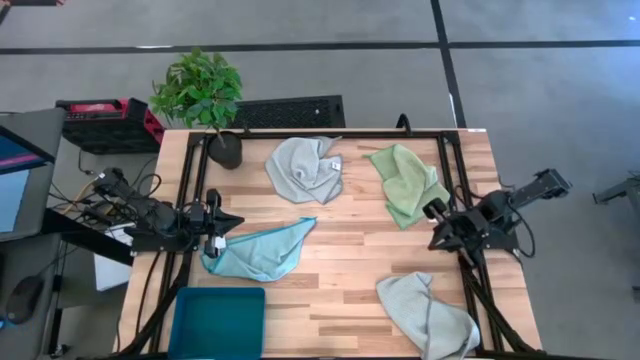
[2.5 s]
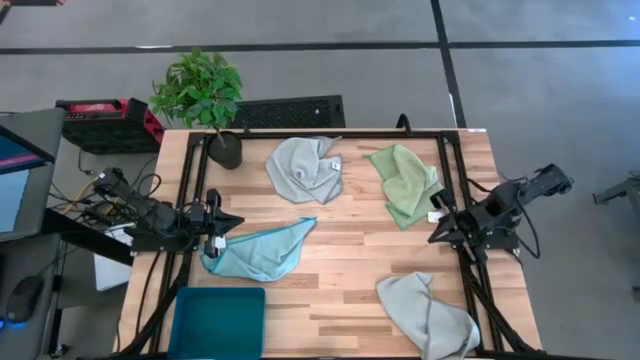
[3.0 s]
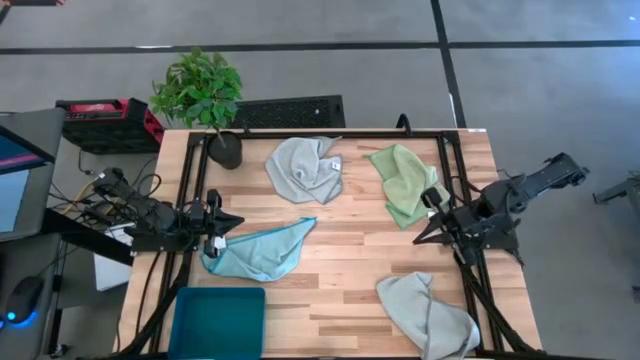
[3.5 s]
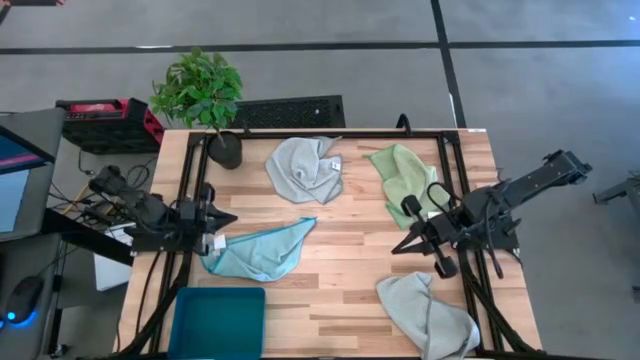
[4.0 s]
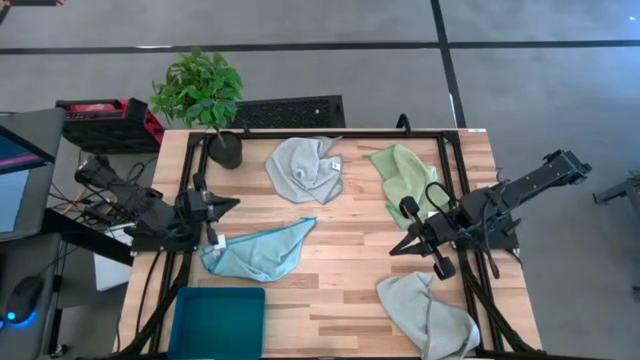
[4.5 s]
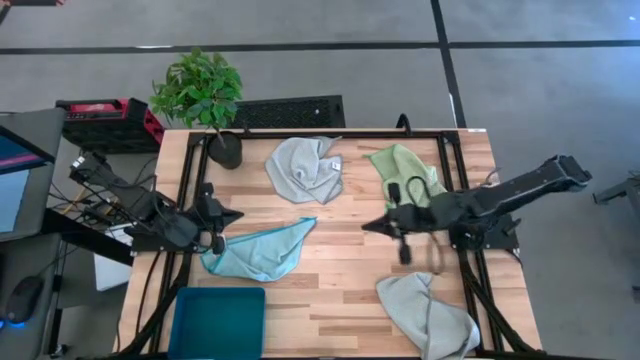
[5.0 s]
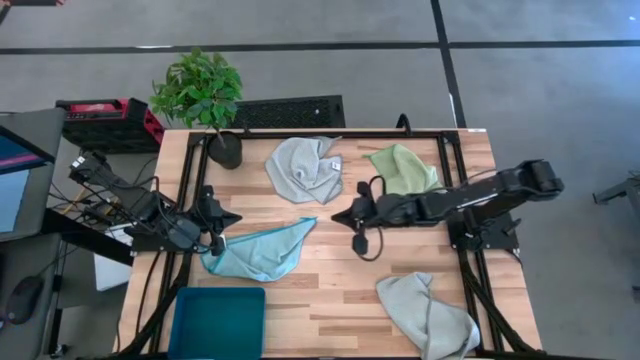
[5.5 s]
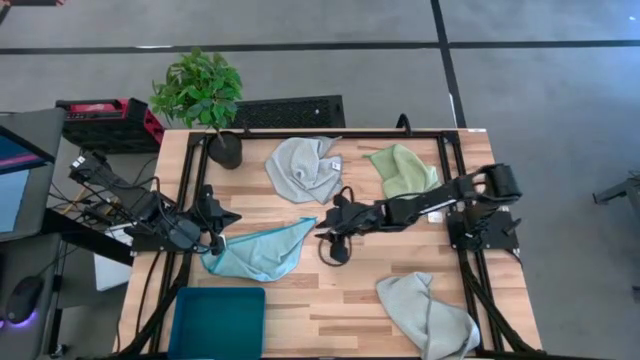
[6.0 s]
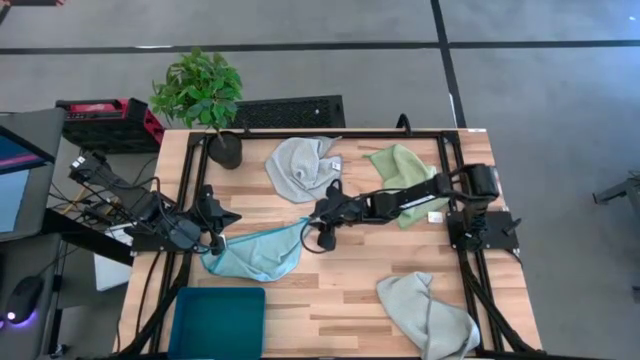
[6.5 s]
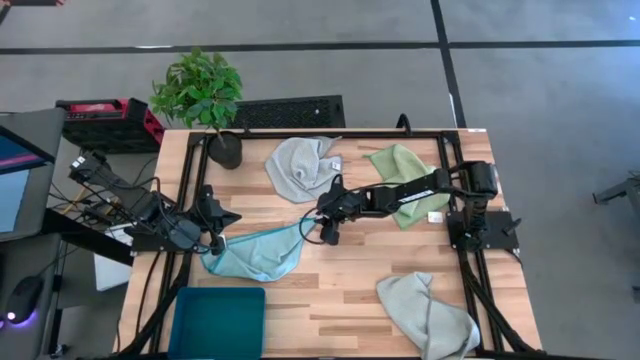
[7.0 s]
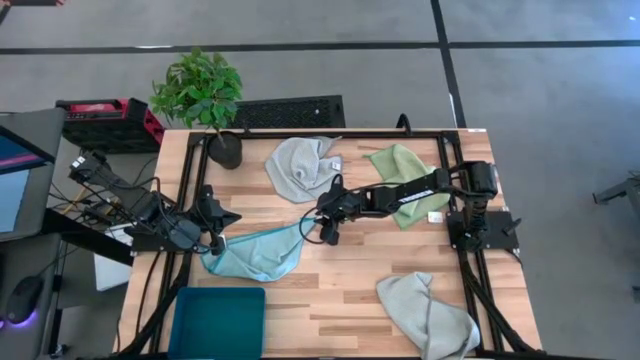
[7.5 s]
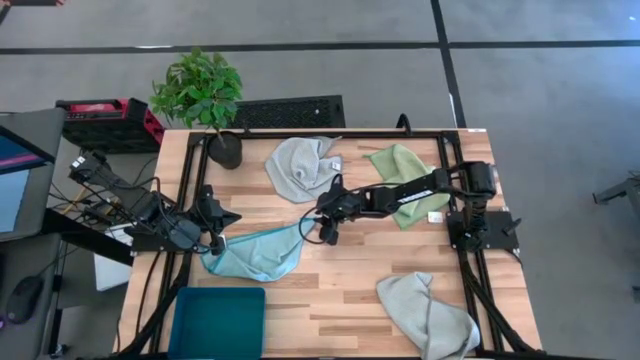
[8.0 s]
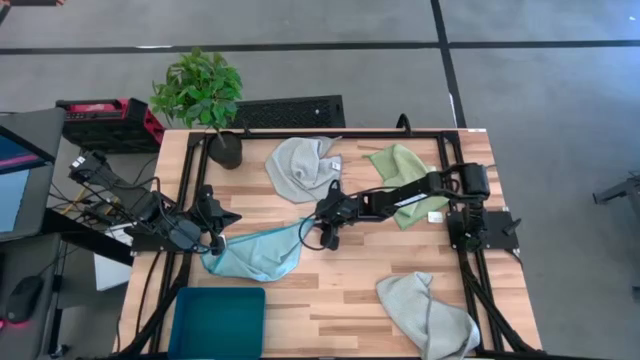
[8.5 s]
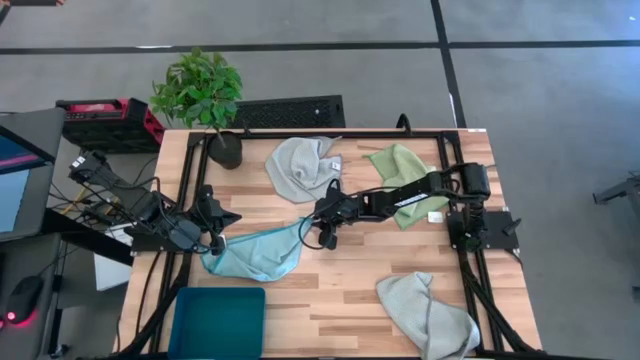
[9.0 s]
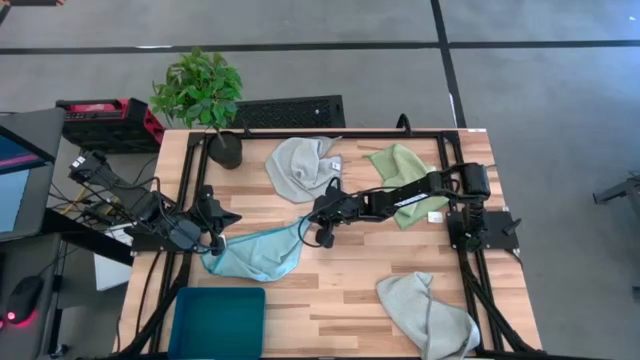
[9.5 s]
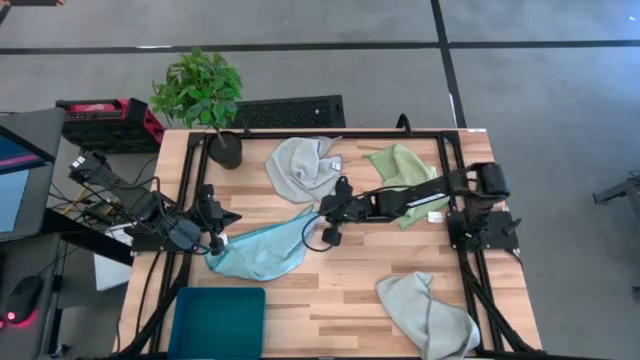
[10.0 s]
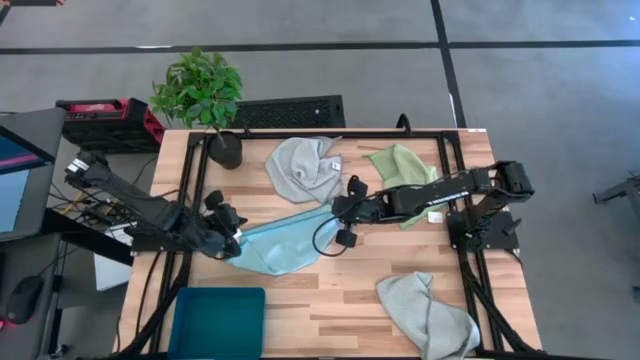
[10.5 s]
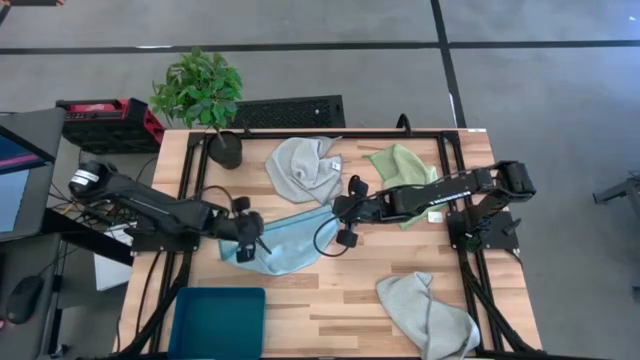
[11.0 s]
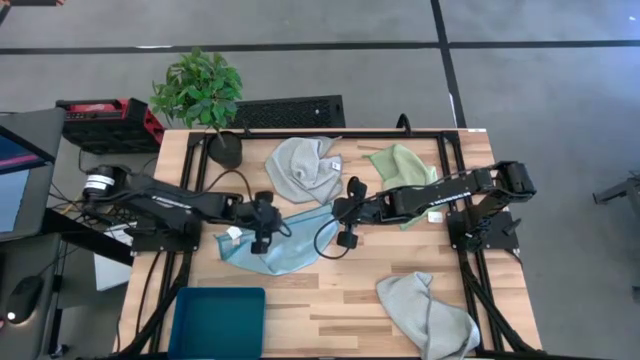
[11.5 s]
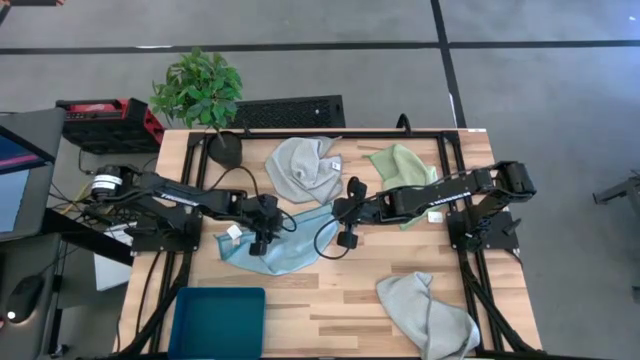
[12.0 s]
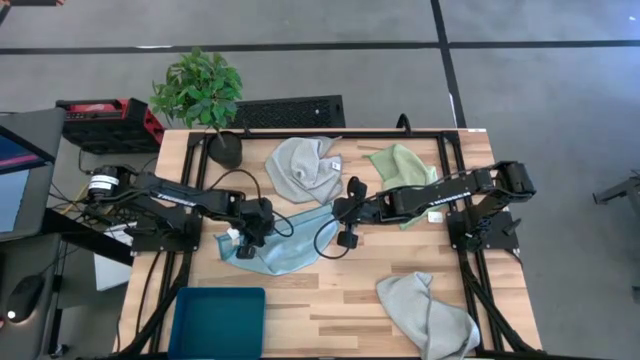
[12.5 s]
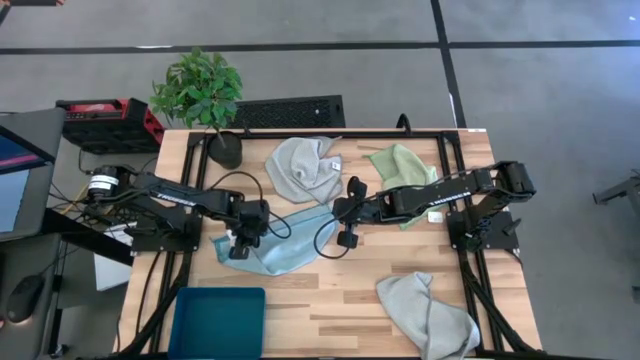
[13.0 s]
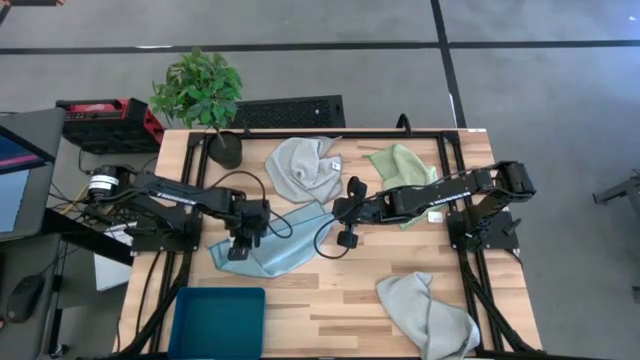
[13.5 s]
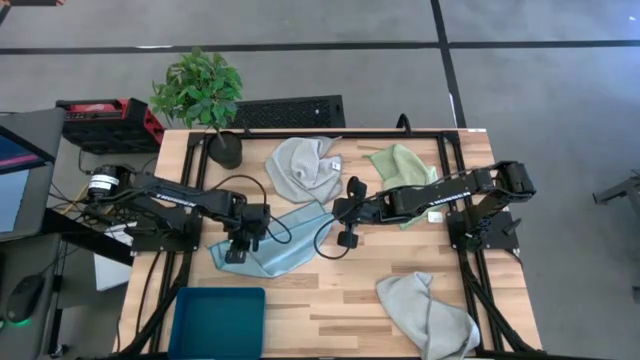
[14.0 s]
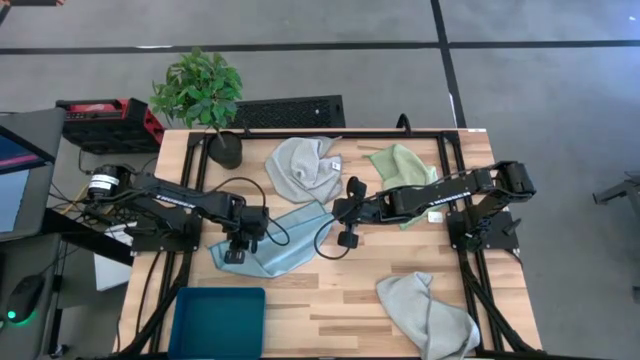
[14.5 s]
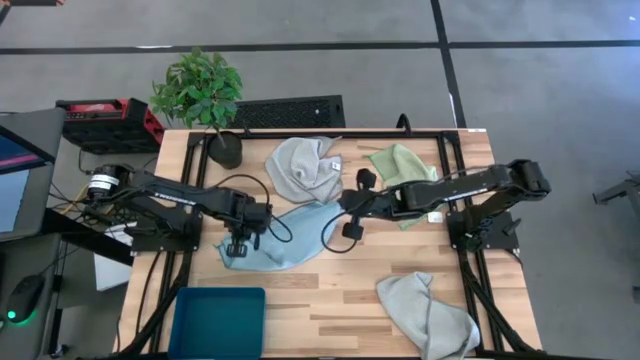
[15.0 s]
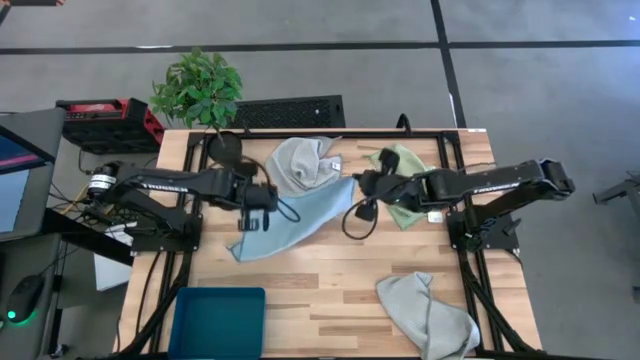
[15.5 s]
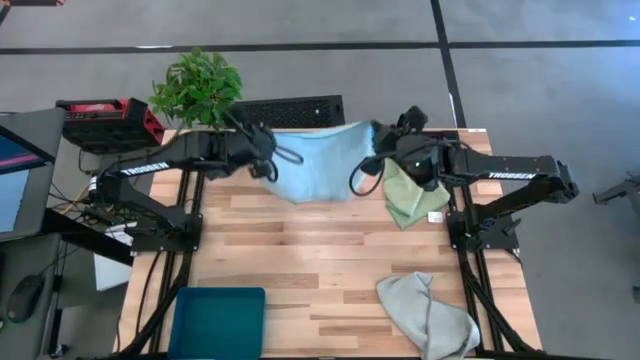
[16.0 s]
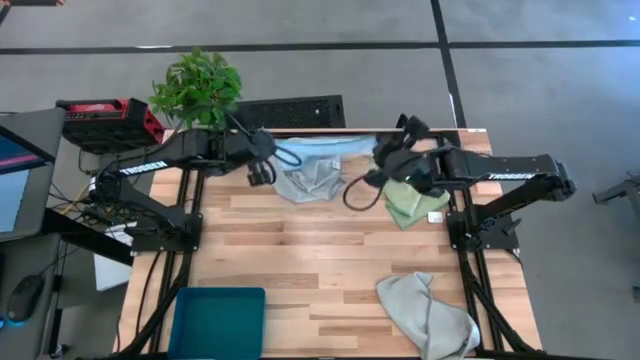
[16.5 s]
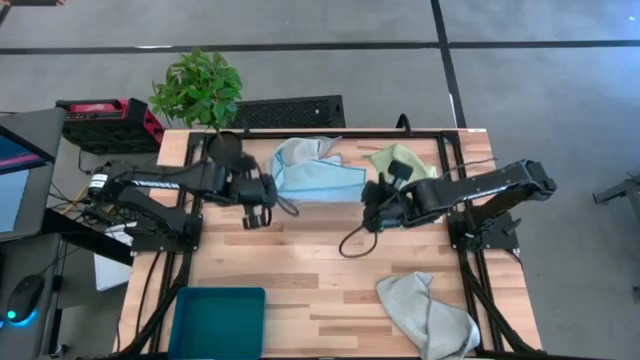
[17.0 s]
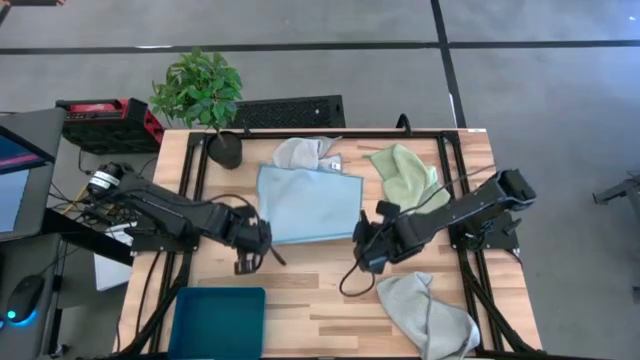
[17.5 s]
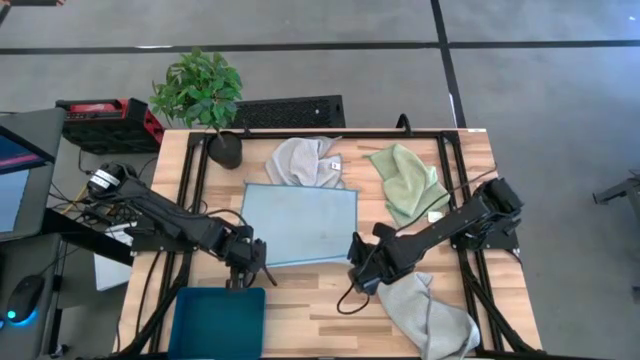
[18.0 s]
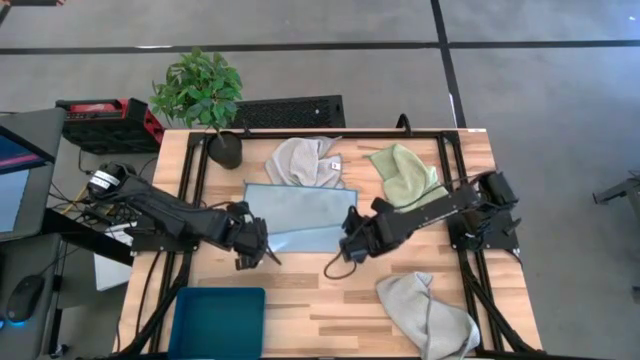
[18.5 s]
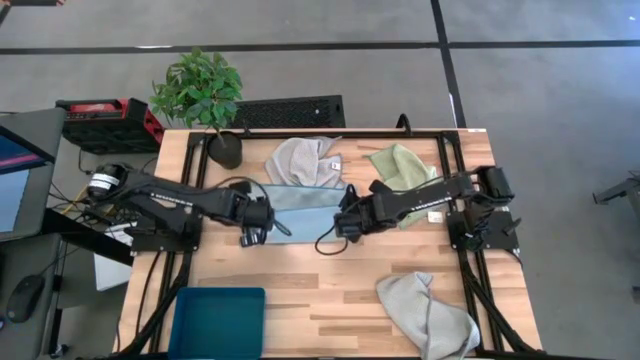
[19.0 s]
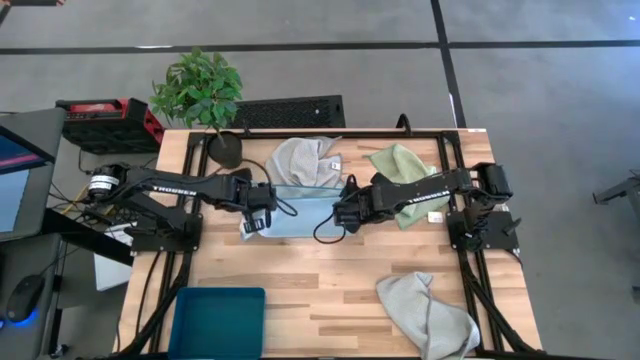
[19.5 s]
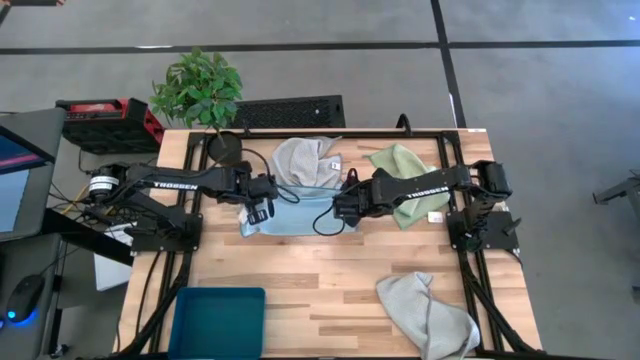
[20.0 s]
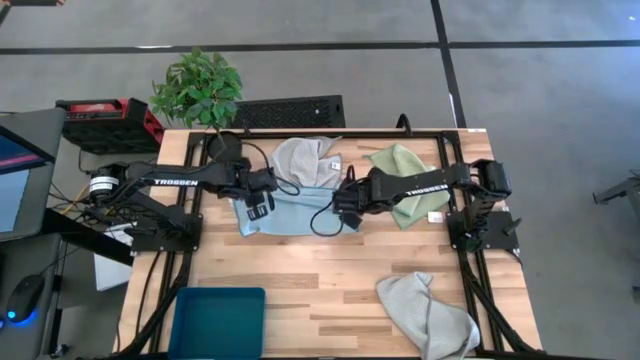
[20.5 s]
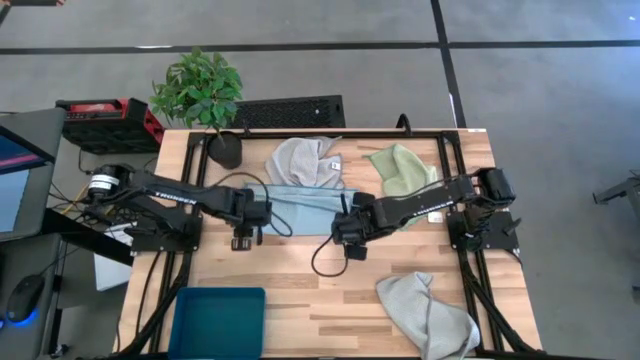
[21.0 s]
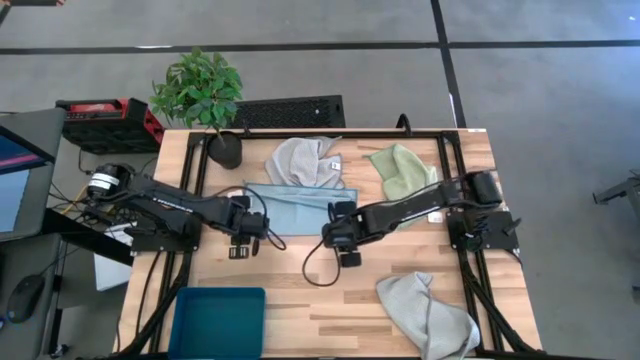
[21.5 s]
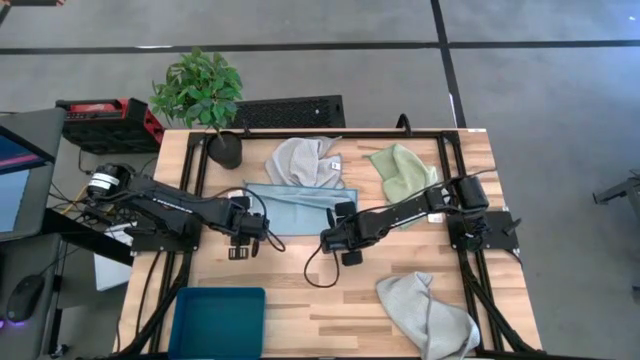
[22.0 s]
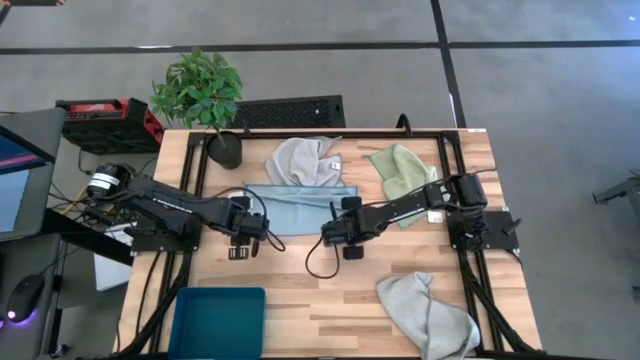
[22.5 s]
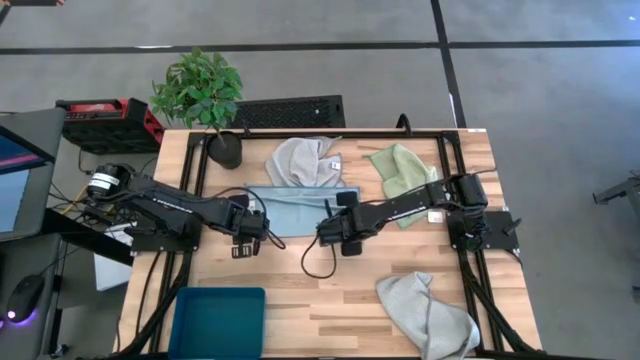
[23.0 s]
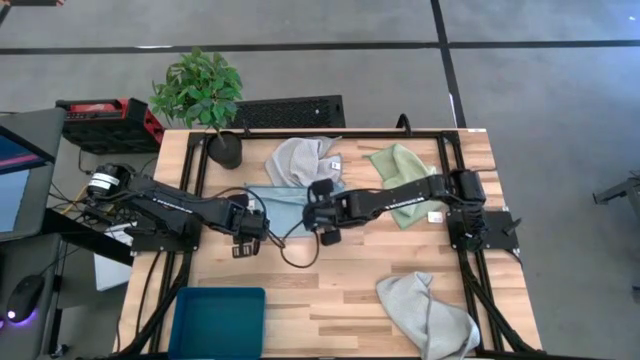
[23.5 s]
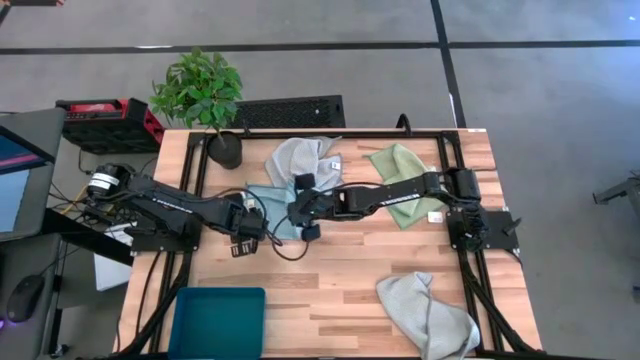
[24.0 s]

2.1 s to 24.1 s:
Task: Fold microfiber towels
Fold the blue microfiber cloth
